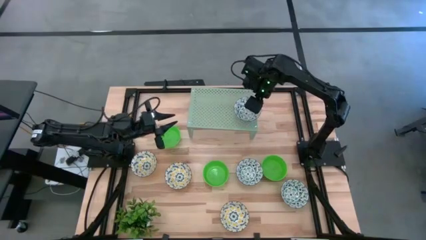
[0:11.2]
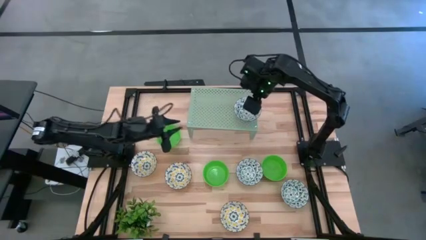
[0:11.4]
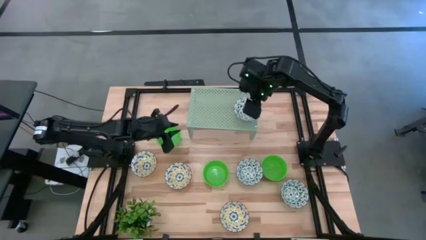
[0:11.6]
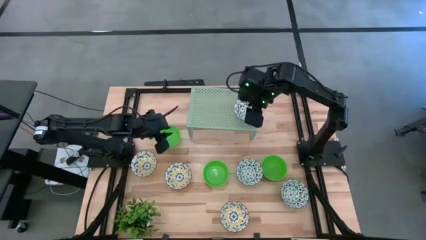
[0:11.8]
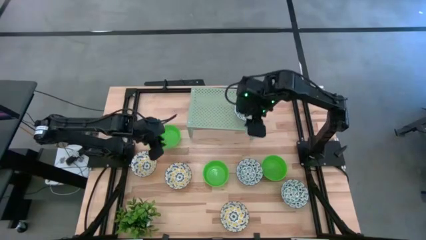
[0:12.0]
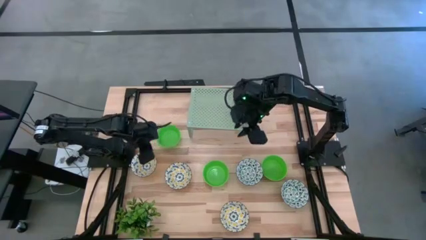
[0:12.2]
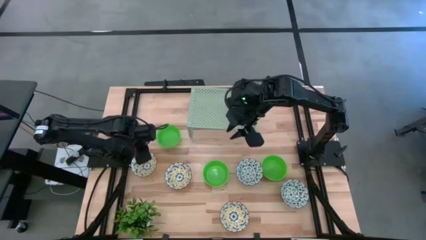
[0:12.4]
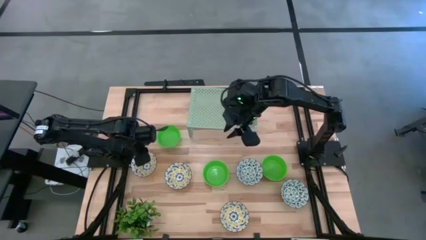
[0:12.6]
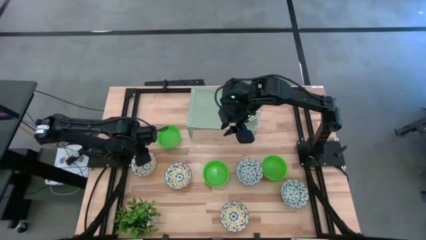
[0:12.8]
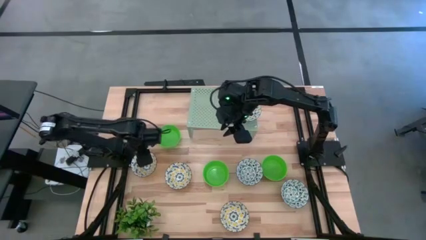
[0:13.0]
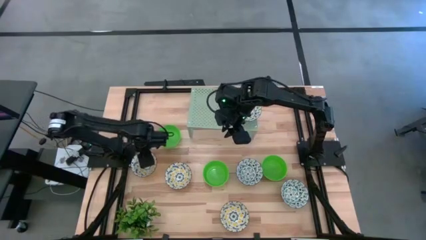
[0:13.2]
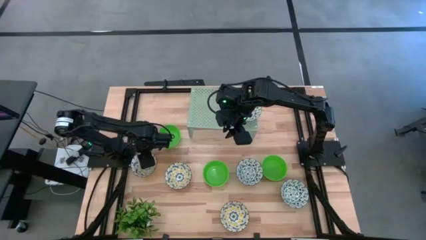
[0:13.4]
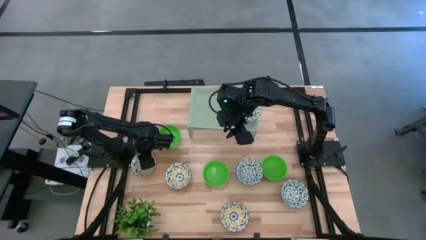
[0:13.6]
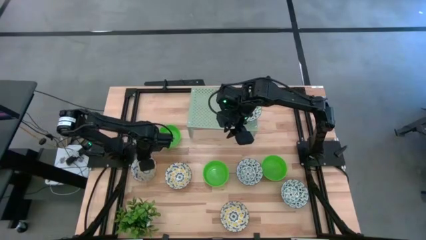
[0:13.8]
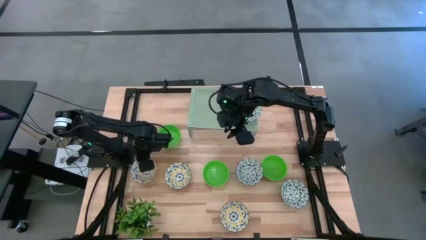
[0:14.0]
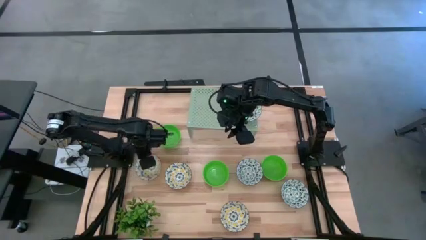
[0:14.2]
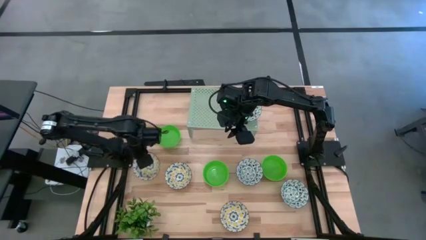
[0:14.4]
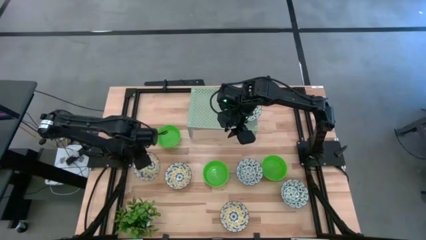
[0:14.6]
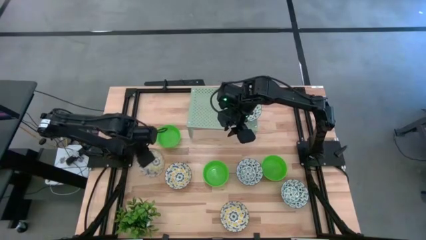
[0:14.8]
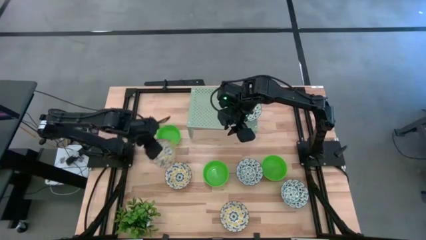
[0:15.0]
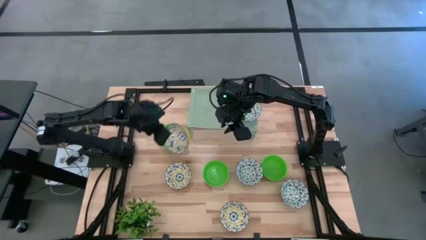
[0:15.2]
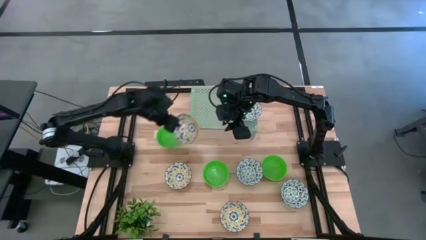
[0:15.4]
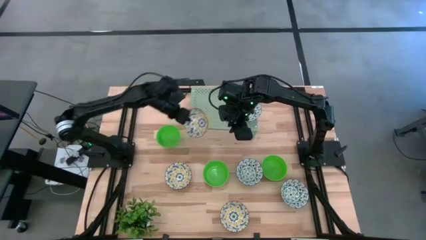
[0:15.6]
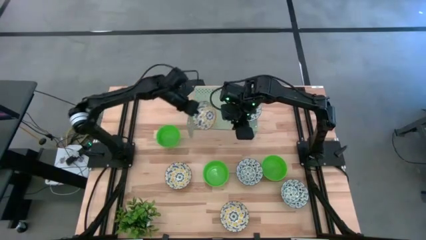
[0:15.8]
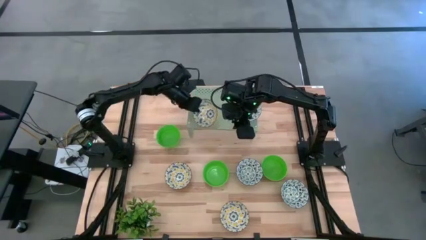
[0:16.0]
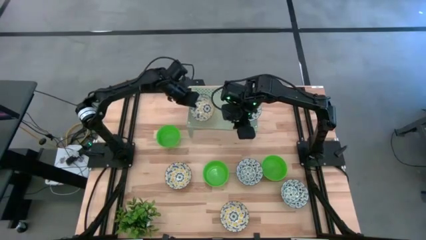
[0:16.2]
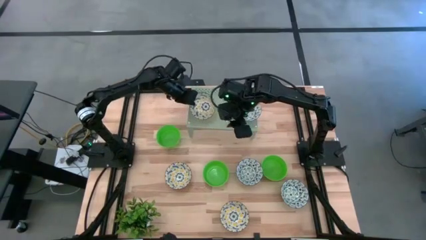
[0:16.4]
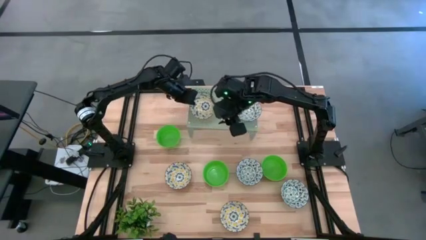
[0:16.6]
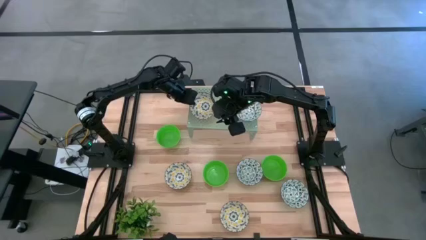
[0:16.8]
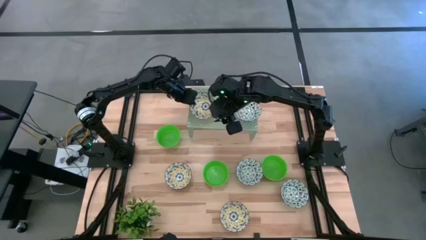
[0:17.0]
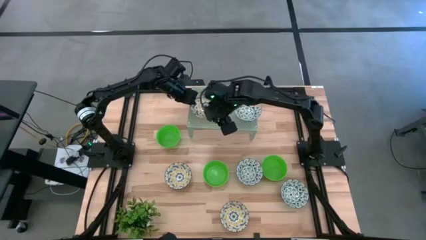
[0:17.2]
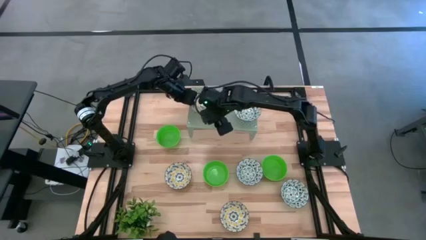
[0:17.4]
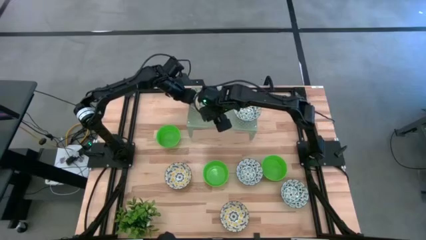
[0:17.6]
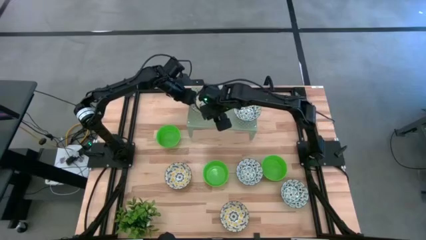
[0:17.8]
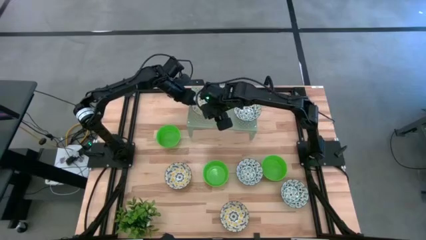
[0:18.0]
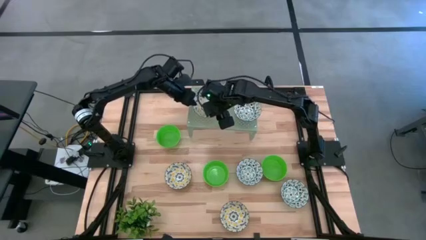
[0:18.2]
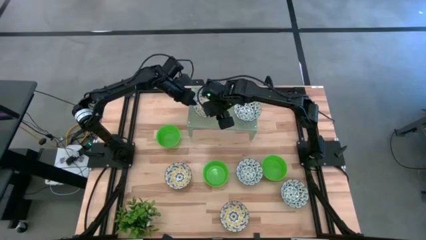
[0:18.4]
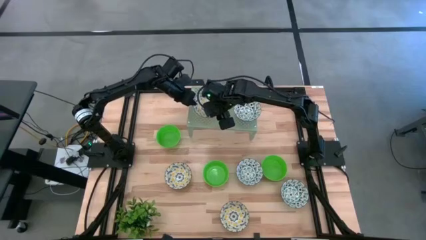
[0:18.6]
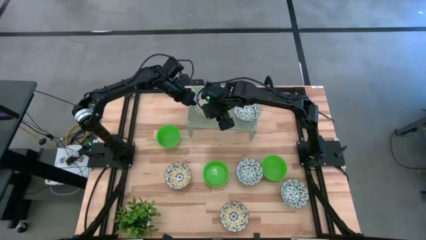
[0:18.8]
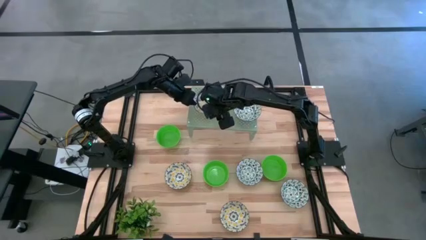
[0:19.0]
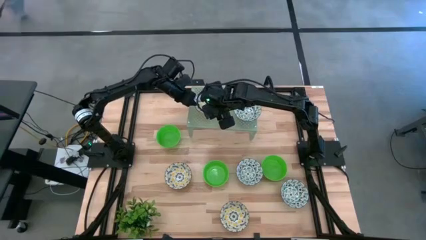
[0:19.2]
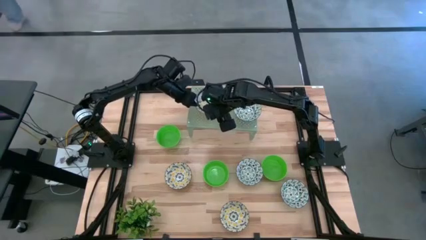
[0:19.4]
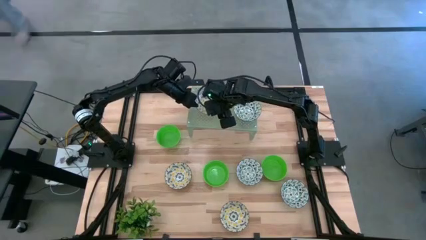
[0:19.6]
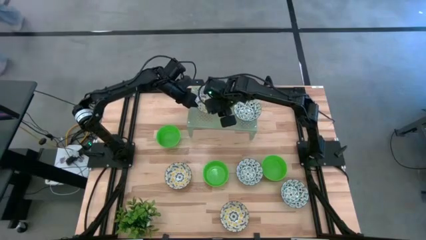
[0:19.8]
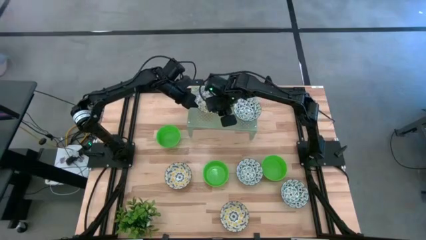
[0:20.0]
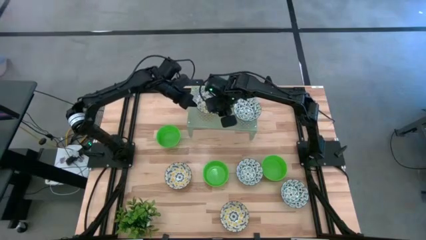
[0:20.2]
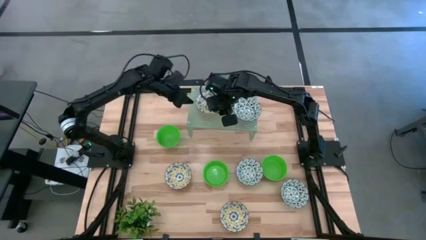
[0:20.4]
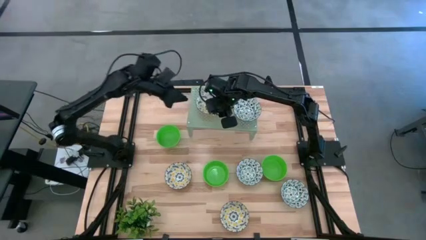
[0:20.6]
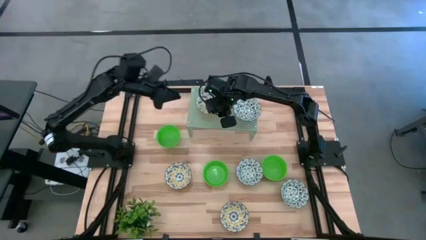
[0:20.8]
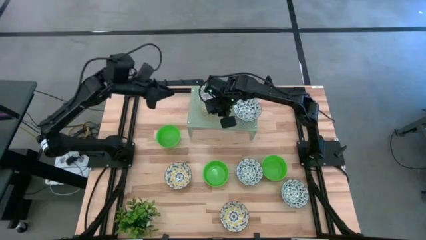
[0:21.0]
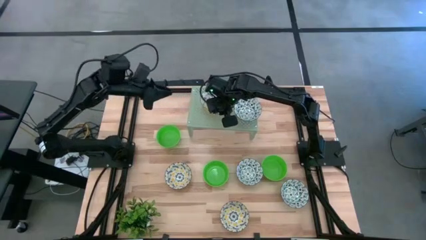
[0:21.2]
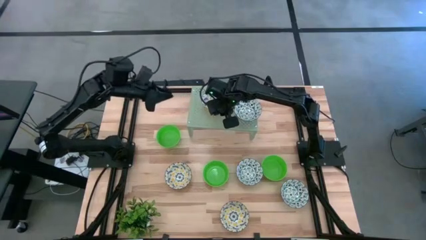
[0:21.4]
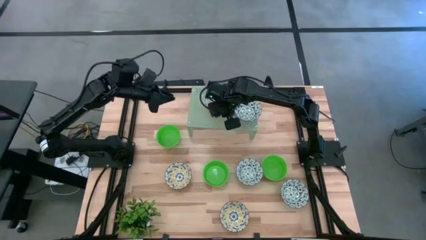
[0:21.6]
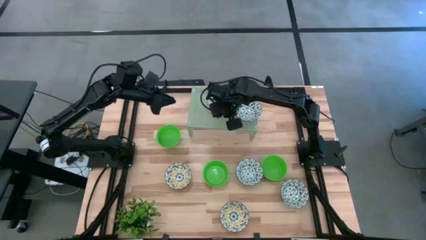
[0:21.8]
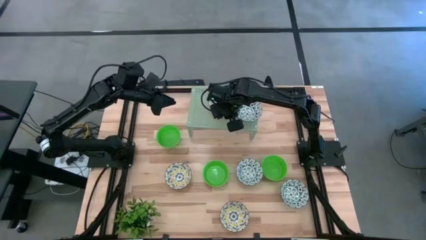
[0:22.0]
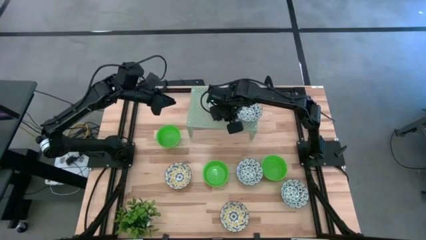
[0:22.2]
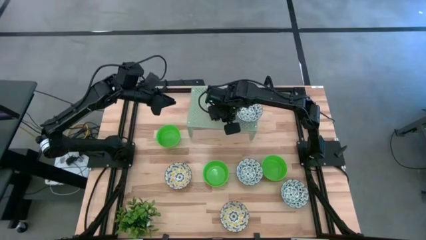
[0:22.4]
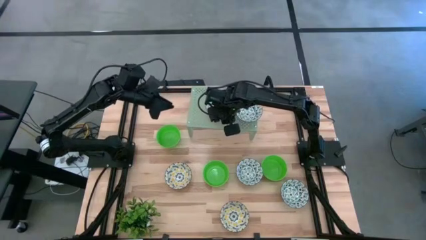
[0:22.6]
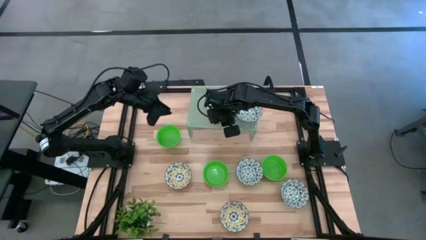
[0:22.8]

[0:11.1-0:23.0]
Task: Pick & Place Mini bowls
Put the top left yellow bowl on the shelf

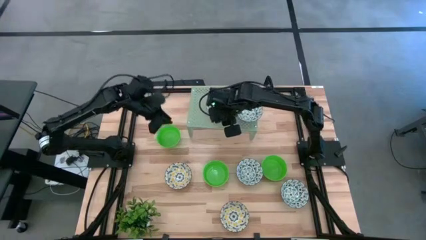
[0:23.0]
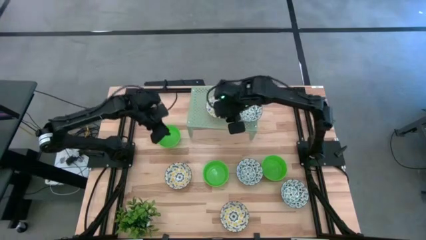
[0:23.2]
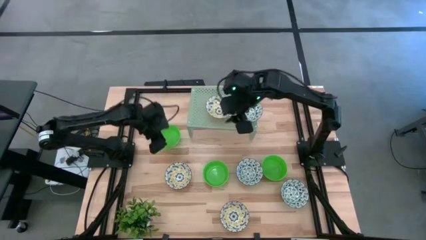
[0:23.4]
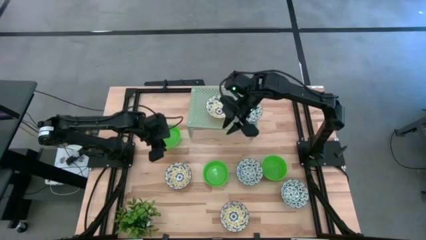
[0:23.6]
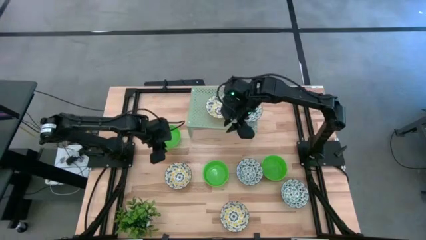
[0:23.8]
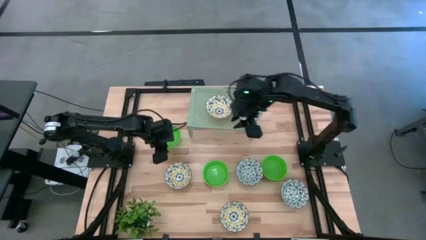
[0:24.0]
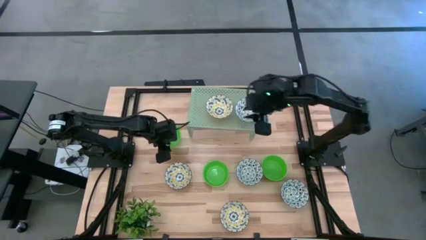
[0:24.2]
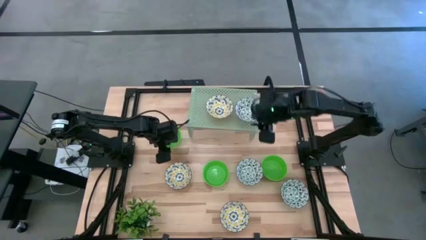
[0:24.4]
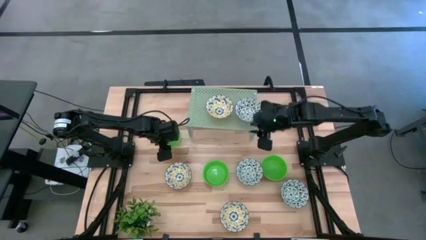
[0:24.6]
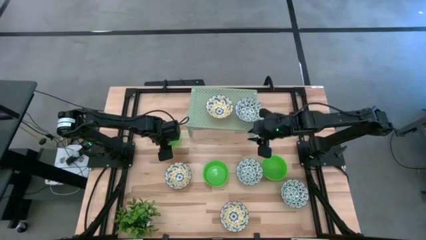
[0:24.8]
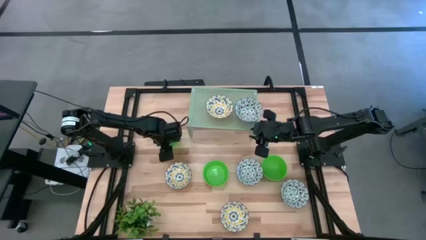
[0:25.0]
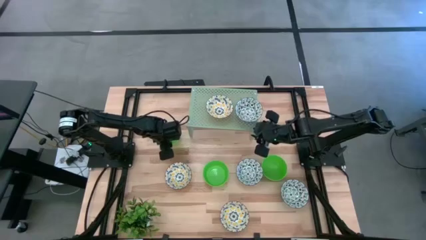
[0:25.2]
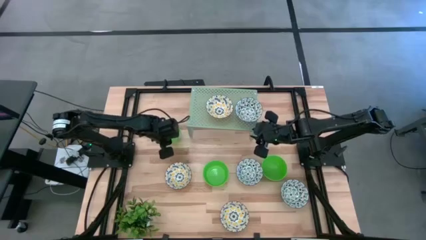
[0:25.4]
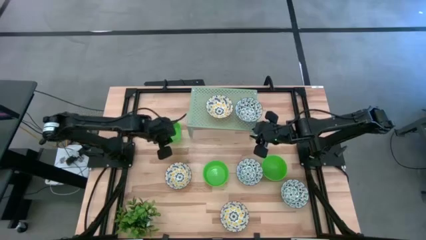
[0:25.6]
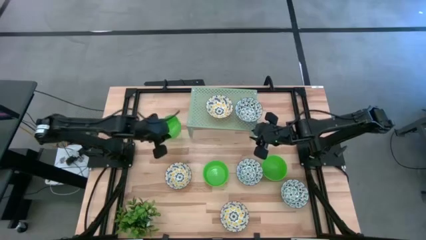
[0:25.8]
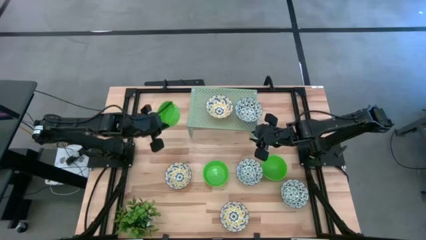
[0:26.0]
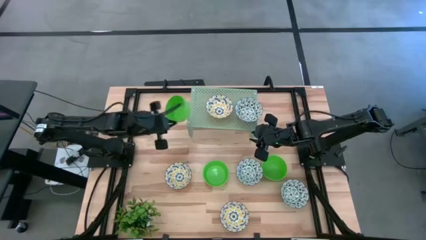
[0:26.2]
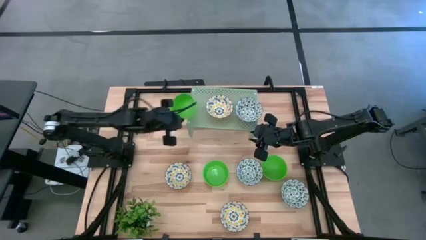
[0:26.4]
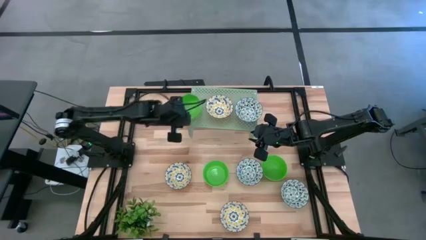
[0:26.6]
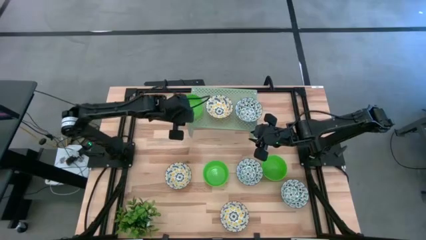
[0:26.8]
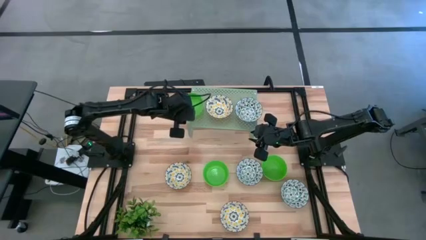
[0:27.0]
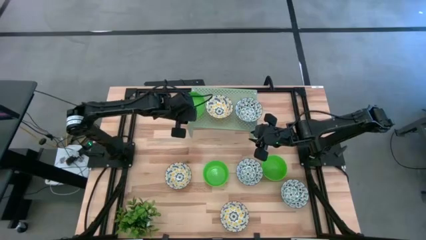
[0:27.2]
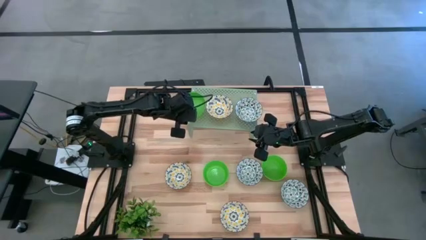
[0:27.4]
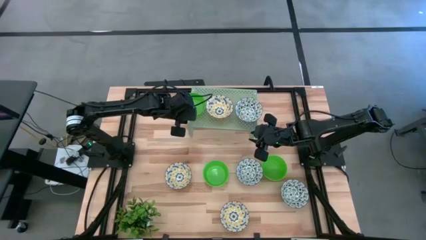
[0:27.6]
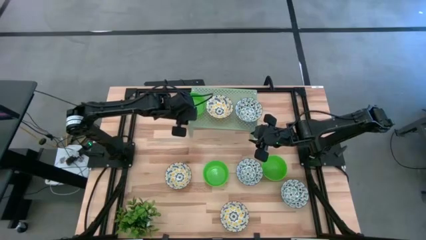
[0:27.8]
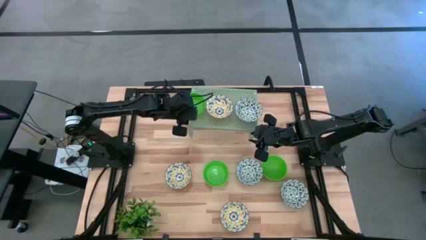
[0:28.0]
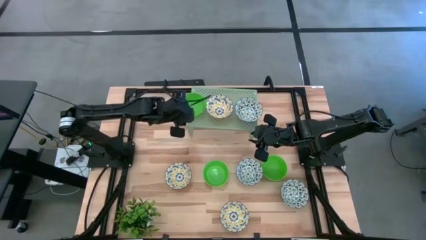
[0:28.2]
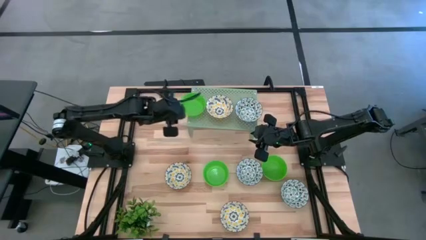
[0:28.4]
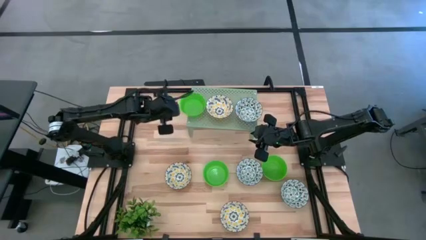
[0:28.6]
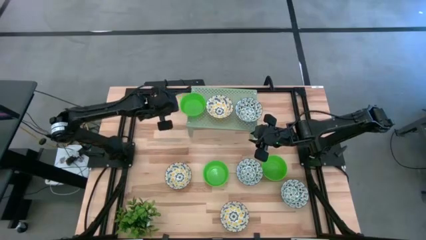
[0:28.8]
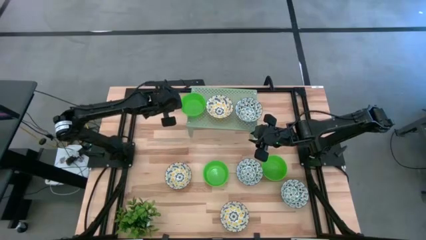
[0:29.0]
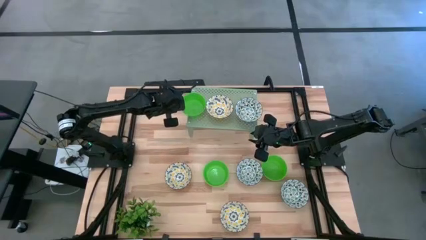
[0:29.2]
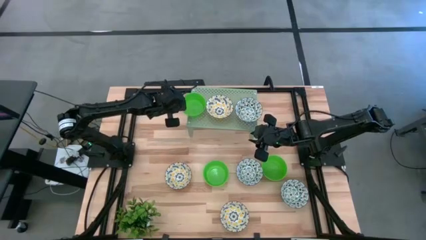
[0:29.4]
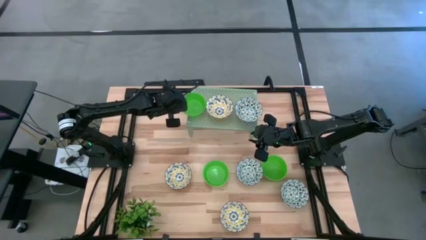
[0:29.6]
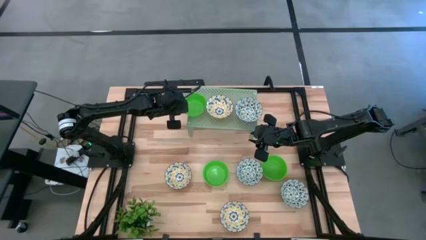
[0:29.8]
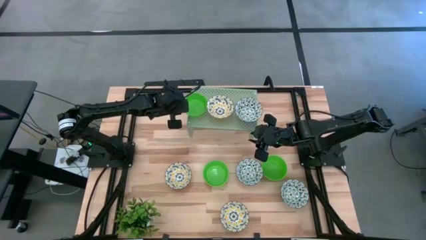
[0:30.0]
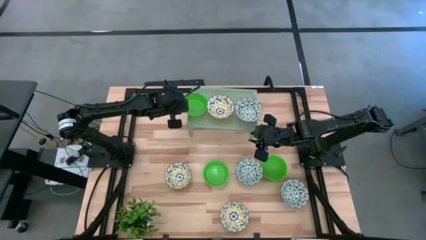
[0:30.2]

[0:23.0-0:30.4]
Put the top green bowl on the shelf
